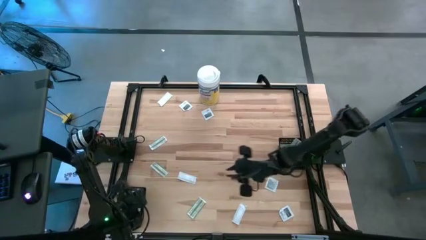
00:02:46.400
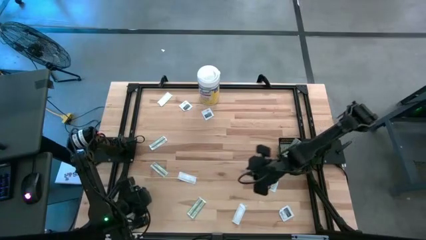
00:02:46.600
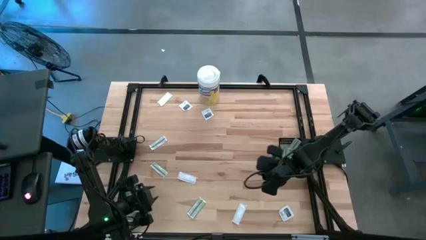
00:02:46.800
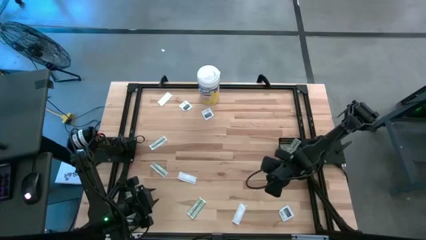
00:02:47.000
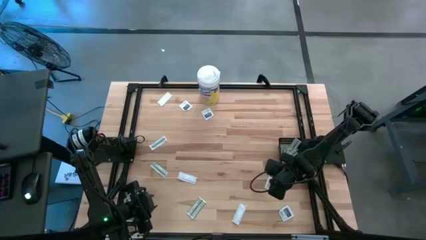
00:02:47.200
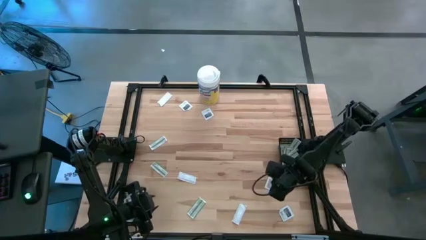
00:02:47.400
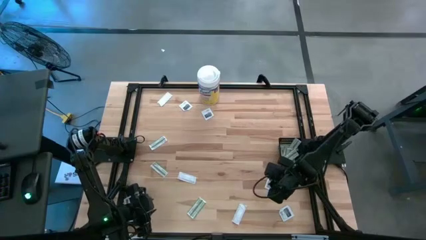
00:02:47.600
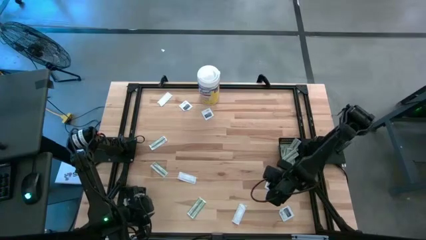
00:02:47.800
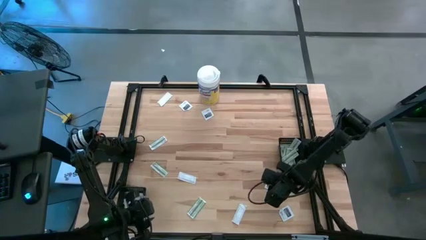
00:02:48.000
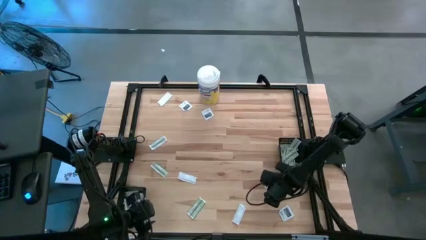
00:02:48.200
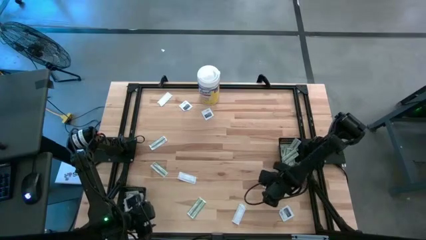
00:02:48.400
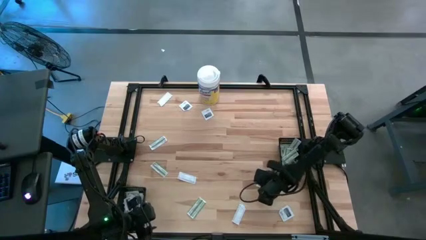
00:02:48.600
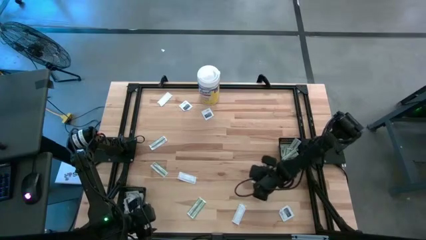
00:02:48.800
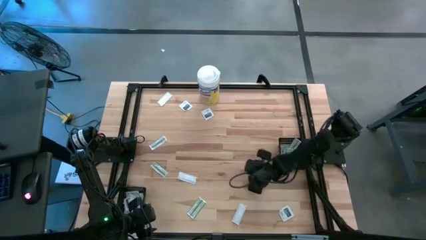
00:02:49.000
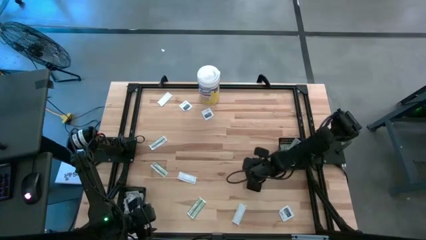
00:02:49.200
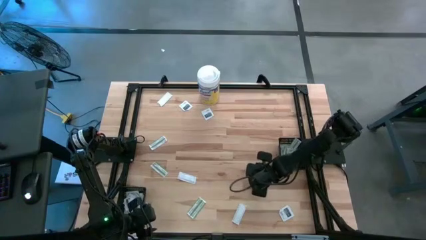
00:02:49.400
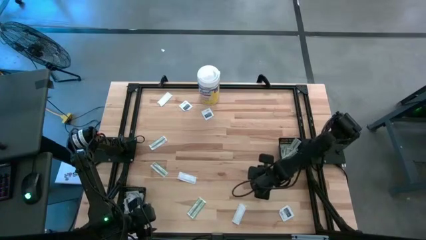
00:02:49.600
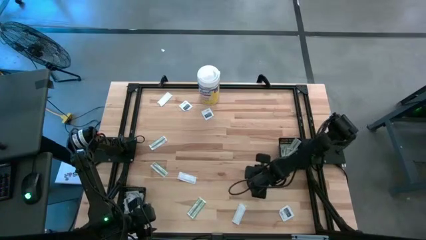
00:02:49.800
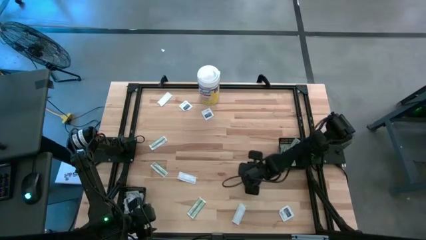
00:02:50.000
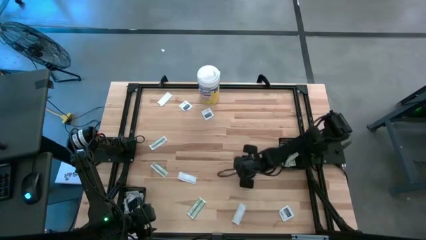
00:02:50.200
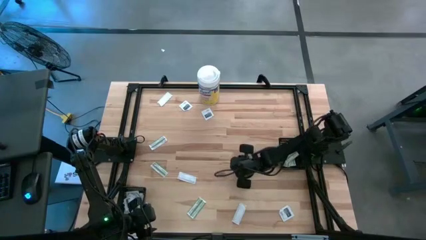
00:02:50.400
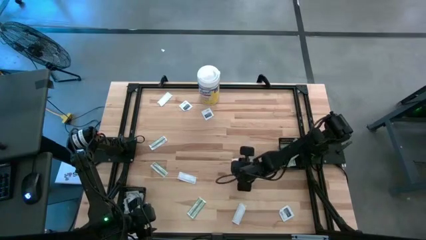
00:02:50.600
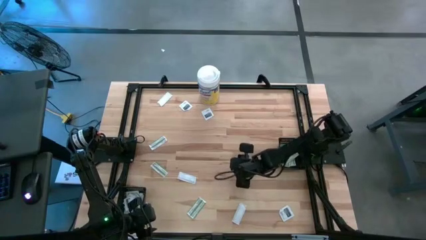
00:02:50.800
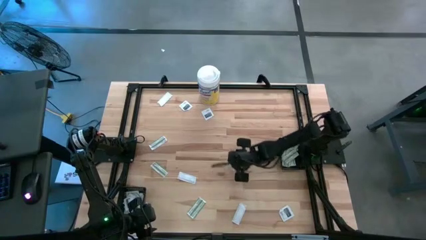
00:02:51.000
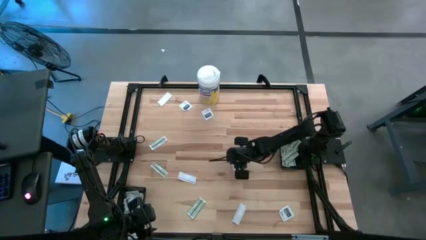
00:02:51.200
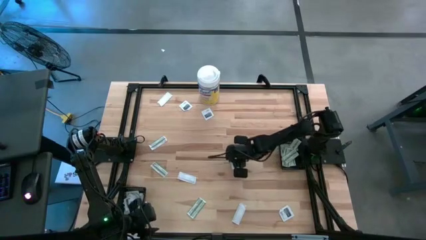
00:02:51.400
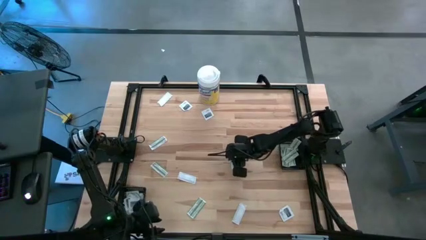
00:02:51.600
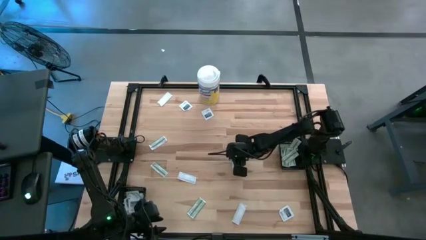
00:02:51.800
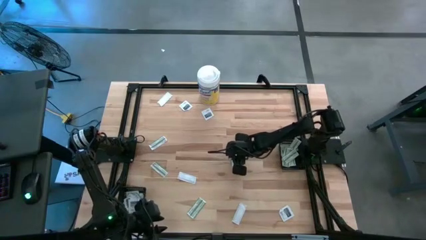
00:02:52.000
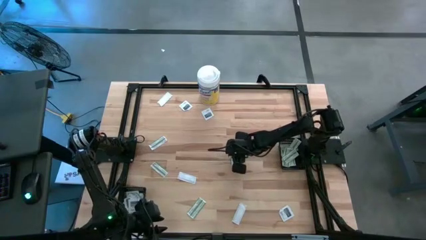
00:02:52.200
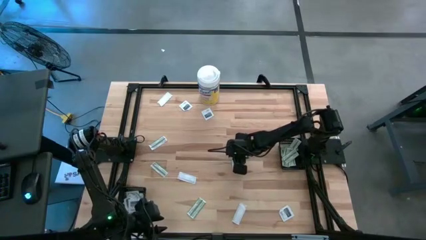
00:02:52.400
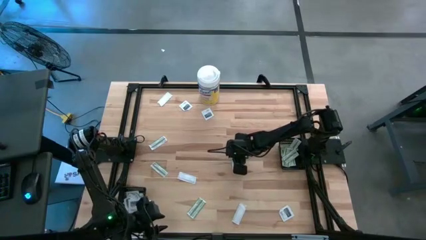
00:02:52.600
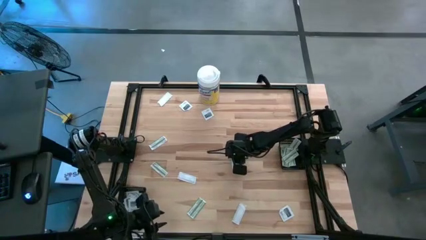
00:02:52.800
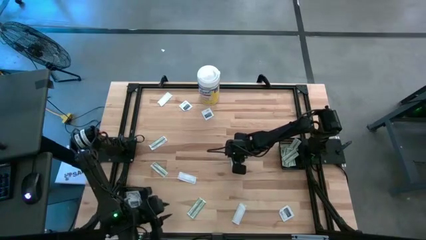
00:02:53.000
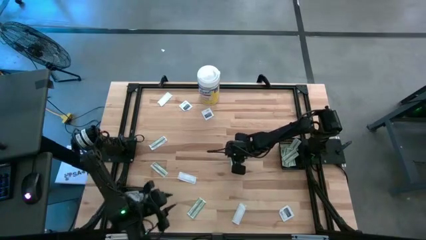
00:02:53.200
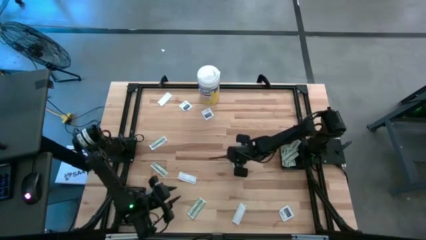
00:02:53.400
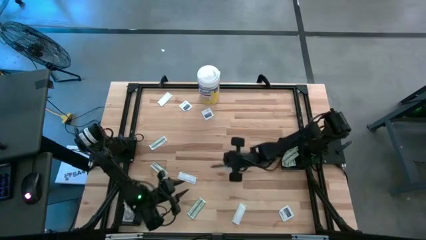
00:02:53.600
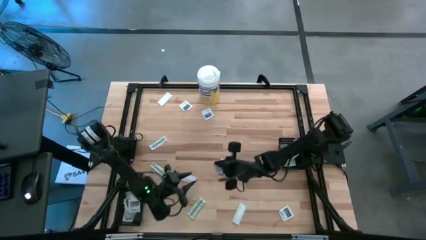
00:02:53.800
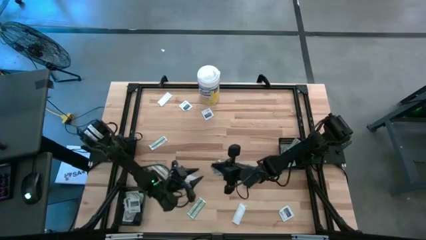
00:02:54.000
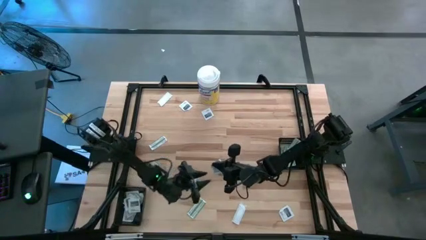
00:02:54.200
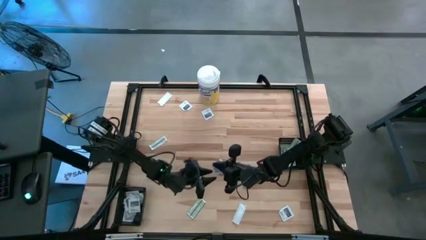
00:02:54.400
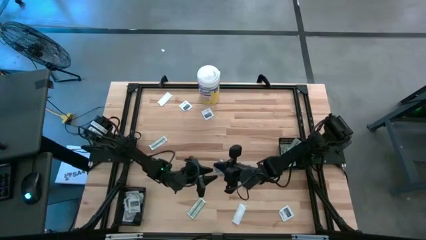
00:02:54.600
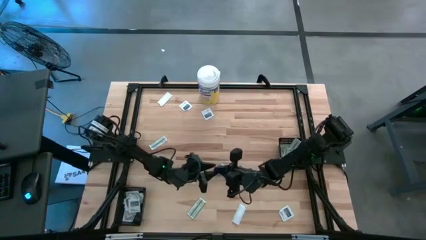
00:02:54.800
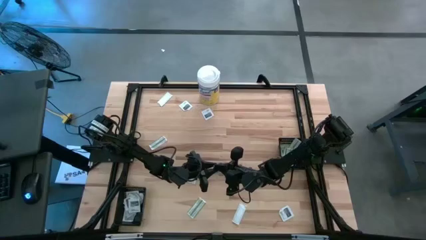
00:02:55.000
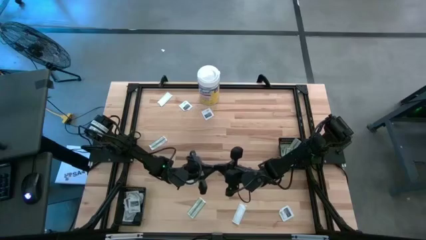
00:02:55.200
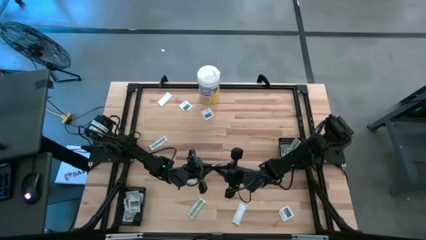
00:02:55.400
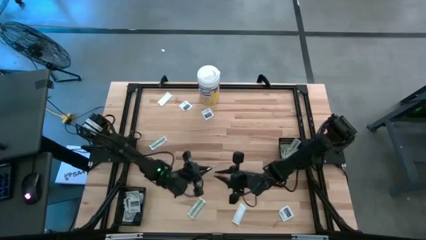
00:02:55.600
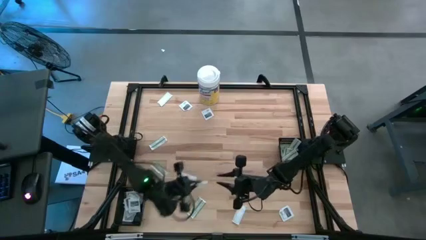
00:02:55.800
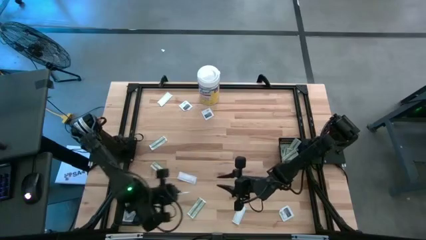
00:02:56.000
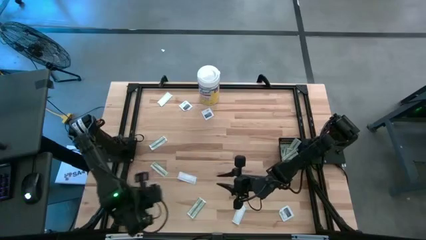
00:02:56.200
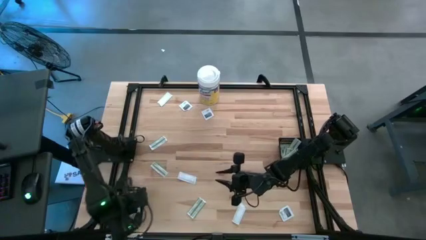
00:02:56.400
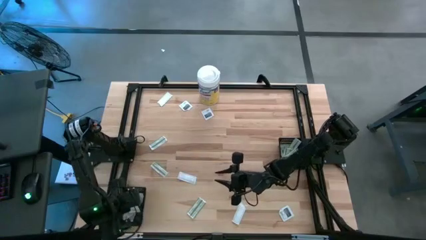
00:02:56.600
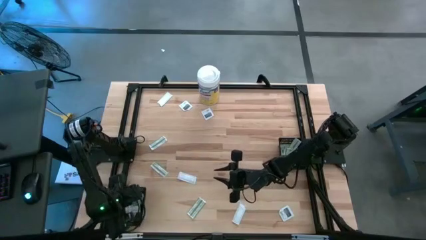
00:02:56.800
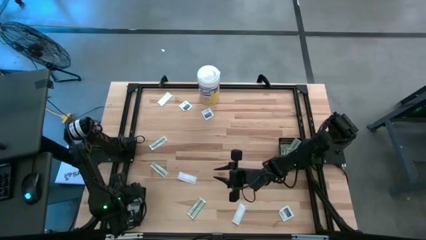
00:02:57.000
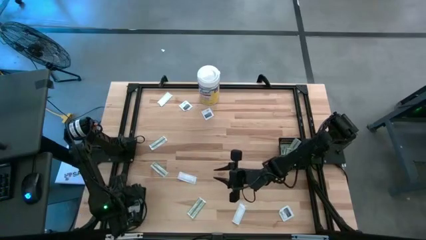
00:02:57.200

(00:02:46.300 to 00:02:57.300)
Task: Pick & Place First Aid Supplies
Put the white towelette sachet into the left black bin
